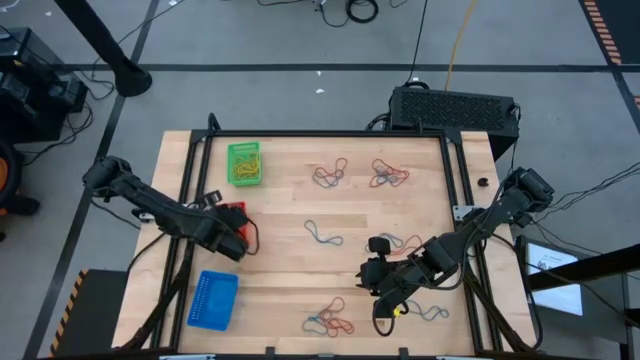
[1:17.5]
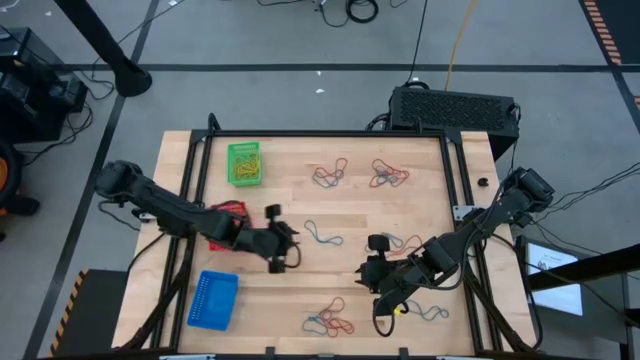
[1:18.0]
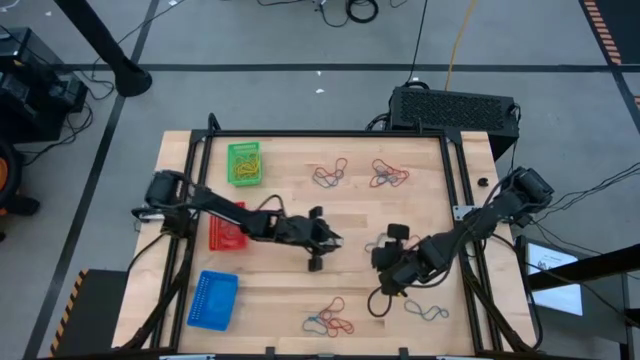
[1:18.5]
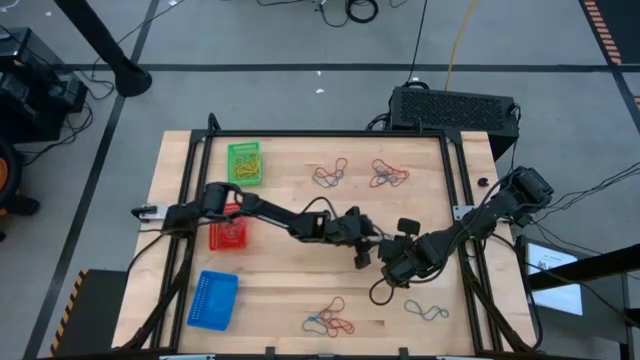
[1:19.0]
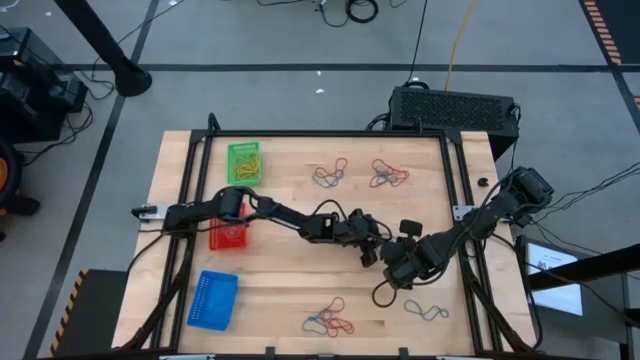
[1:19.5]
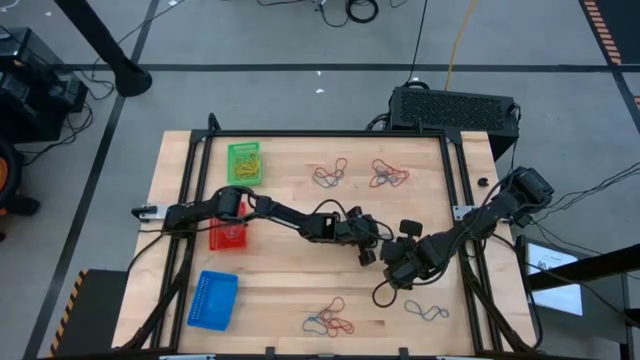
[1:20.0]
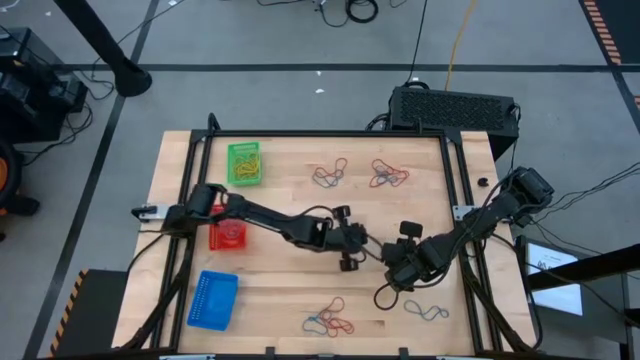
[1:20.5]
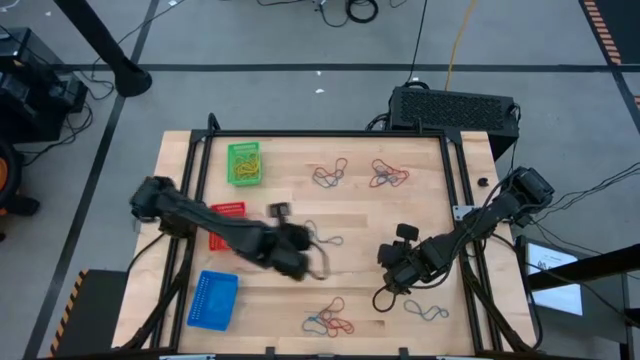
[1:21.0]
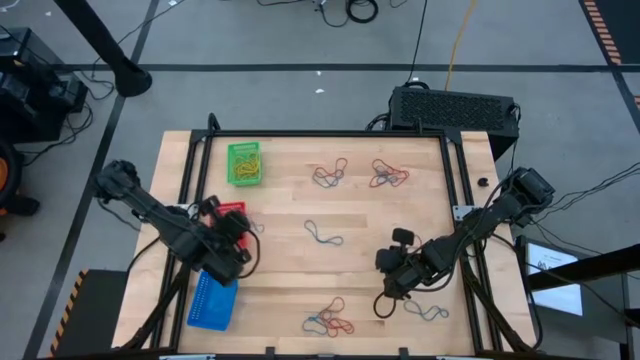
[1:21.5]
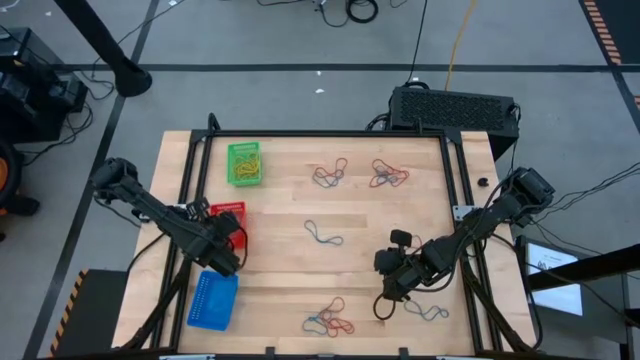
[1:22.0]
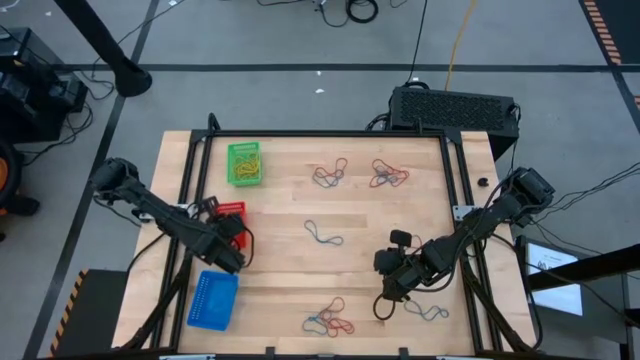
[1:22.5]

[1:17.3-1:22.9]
Task: Sort rubber bands into baskets
Put the blue rubber band into the red bin

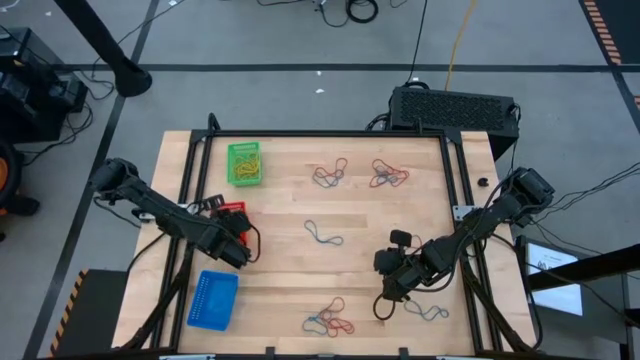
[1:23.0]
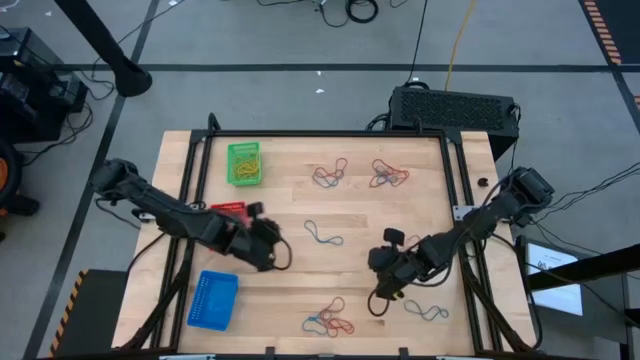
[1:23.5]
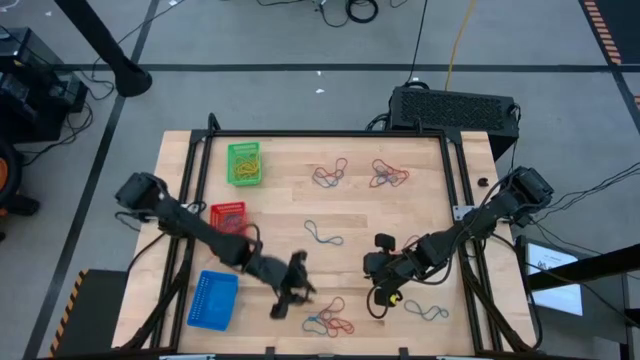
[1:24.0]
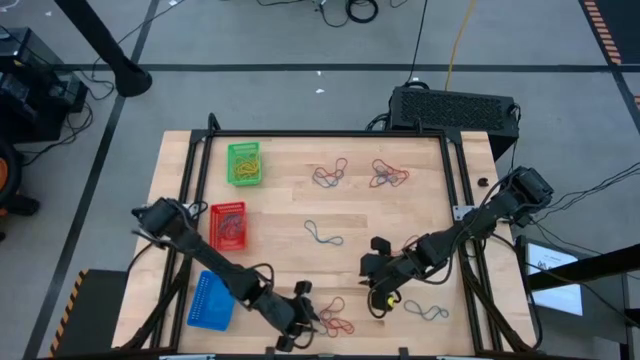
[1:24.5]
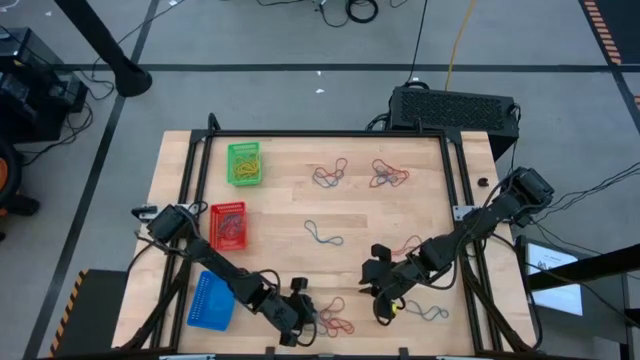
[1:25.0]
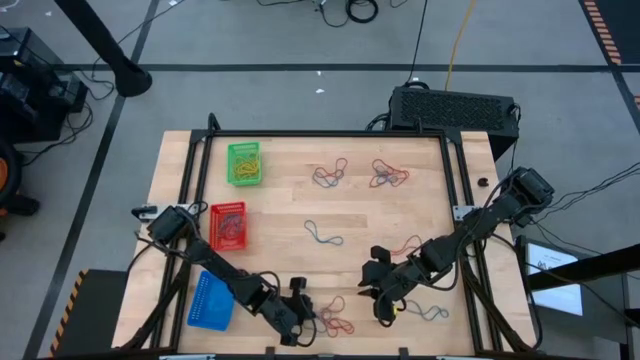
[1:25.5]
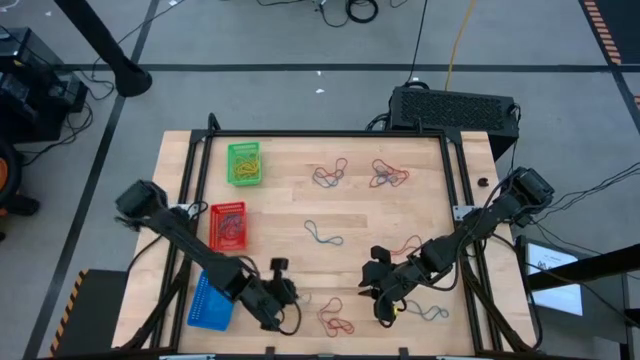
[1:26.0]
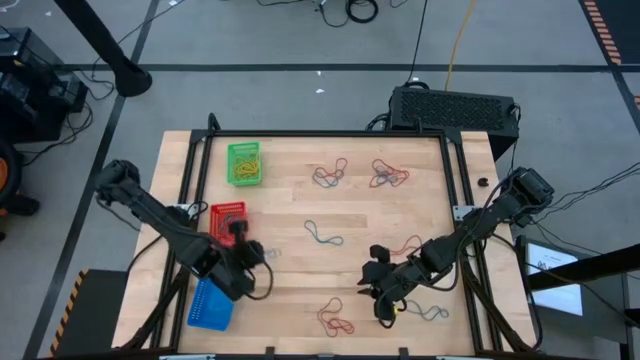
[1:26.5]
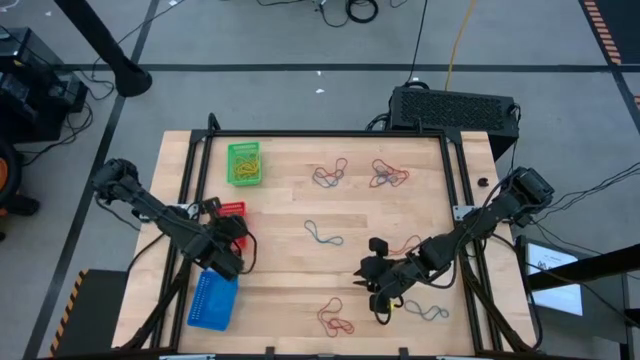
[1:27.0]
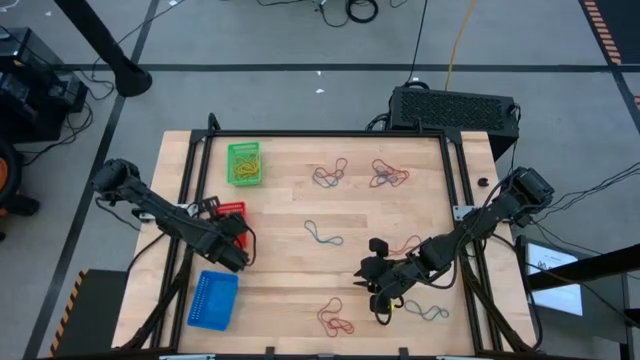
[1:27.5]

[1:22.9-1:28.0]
Put the blue rubber band into the red bin

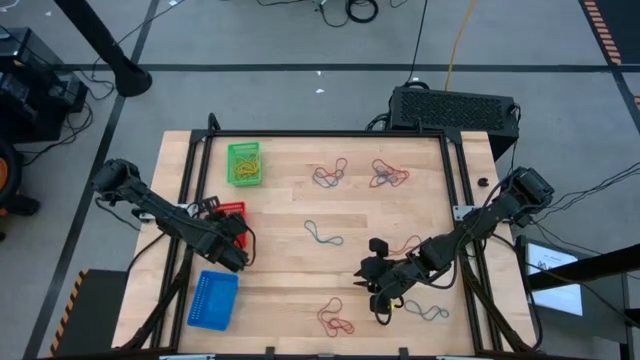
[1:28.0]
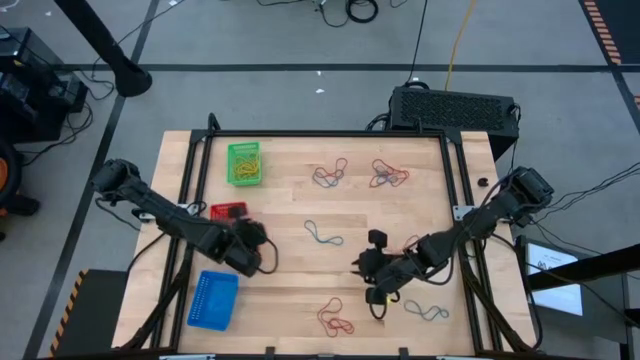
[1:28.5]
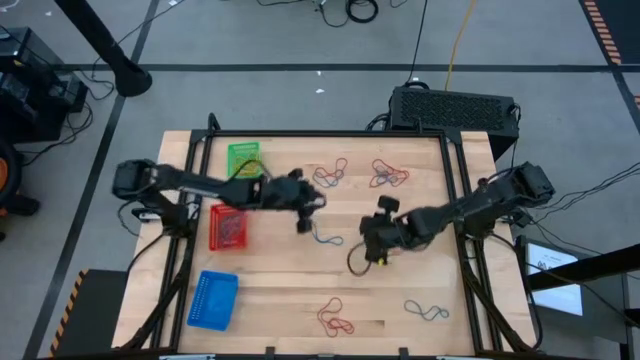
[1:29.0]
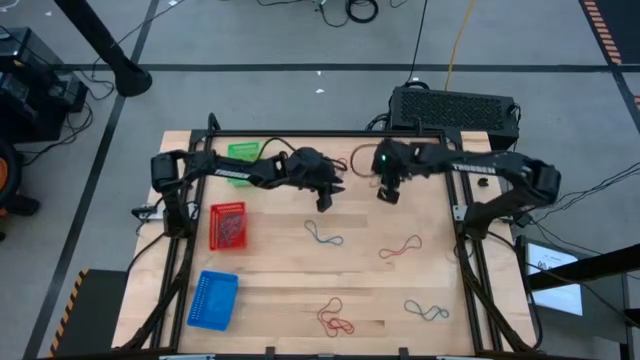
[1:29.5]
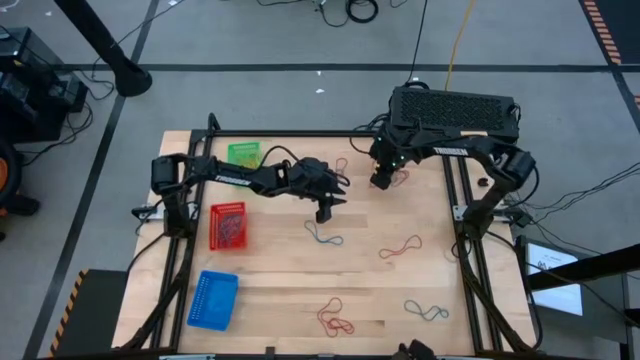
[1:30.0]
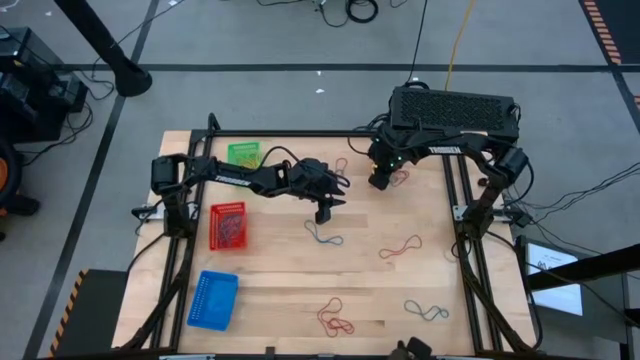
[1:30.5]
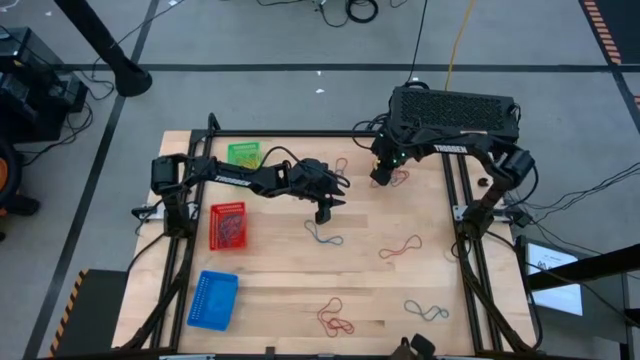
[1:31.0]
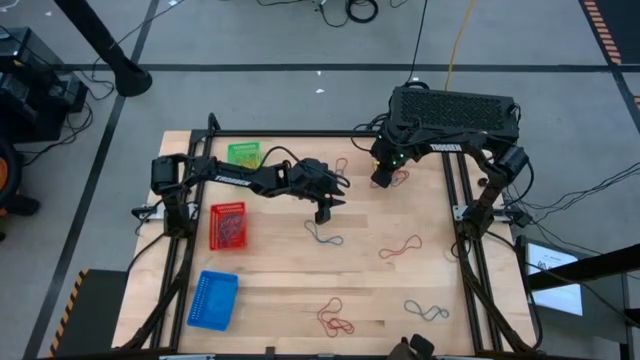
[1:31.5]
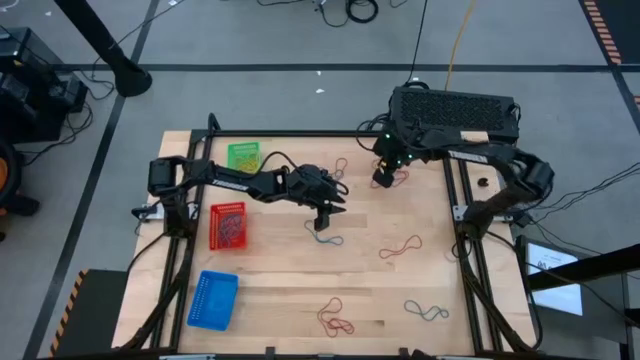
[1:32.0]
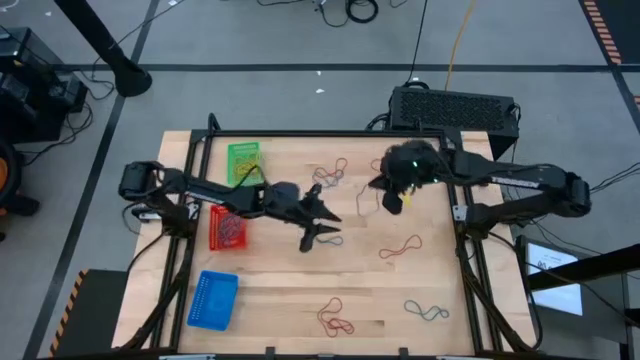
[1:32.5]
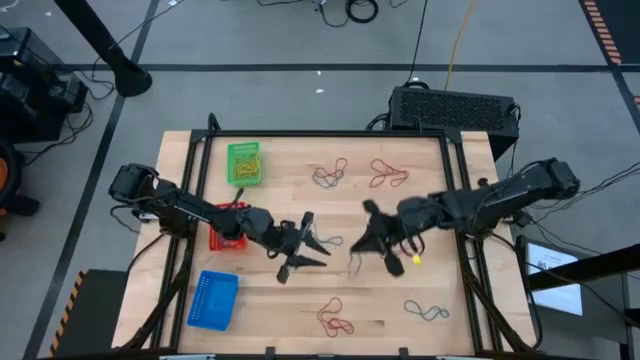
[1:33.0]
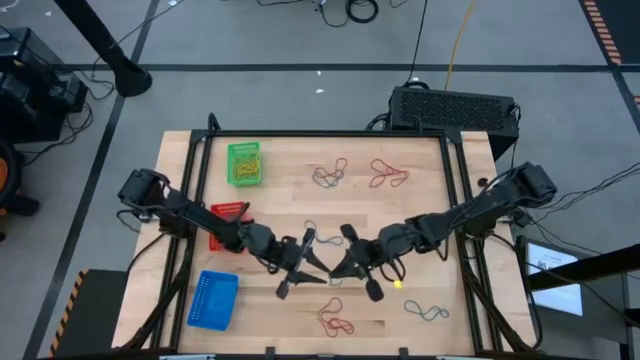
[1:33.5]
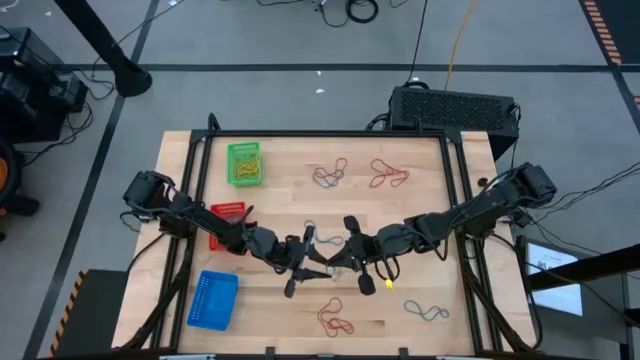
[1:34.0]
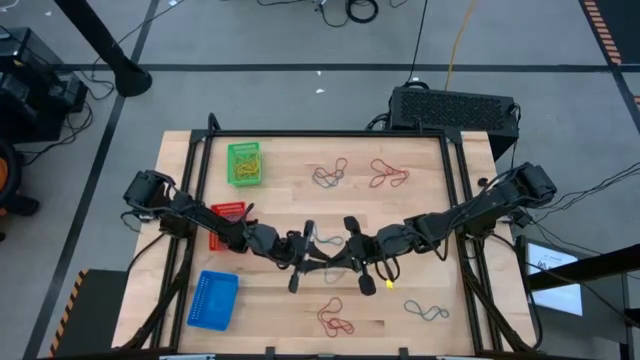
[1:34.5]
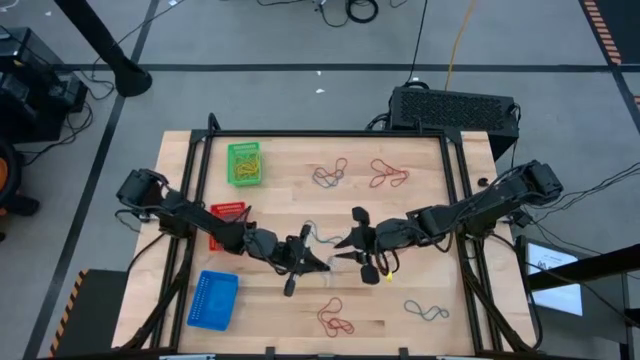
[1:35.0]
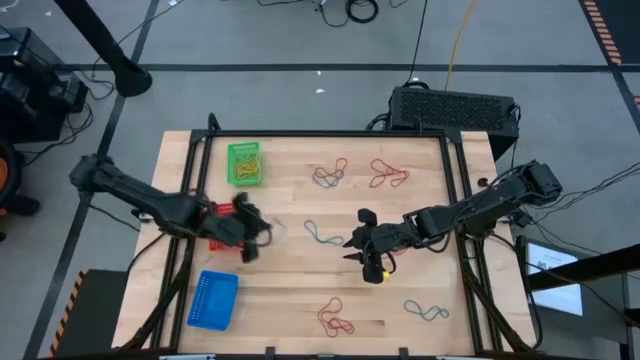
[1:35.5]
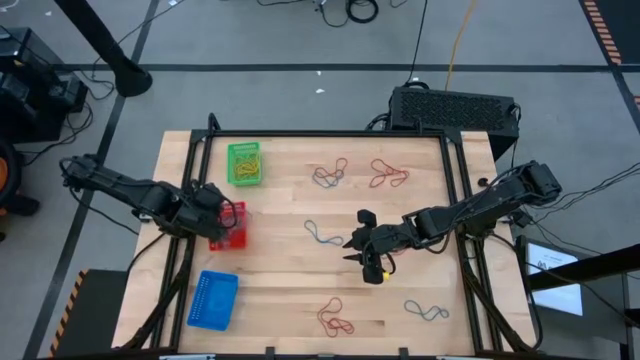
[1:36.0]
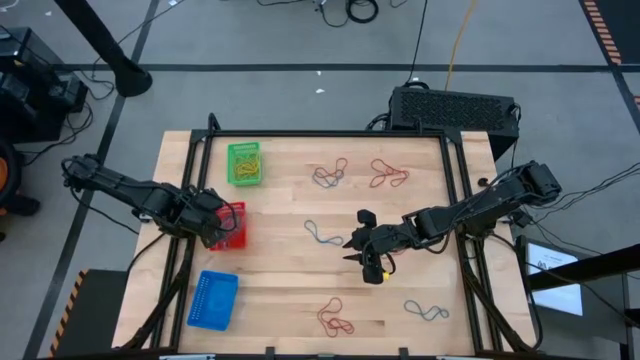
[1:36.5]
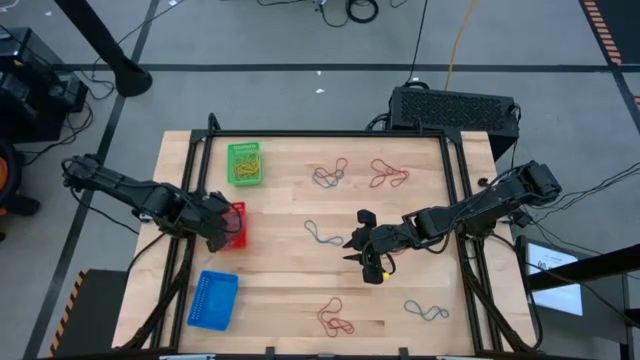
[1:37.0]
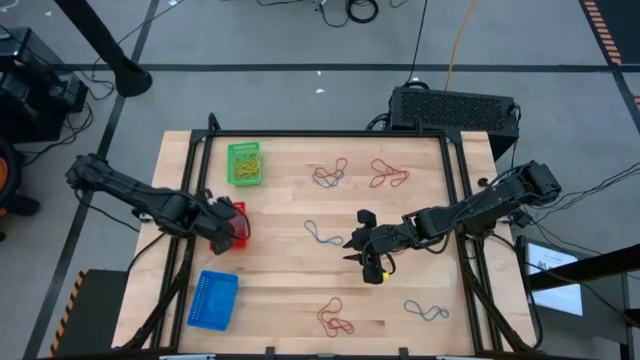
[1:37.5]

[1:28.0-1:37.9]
Put the blue rubber band into the red bin

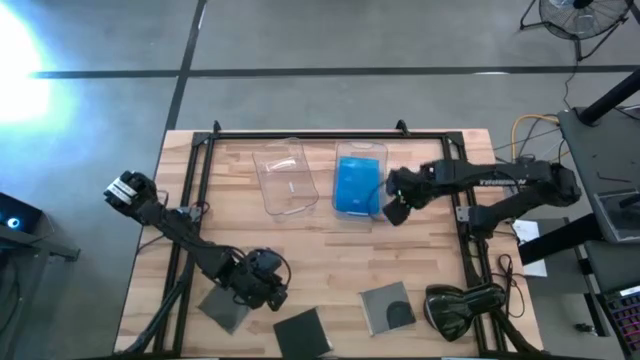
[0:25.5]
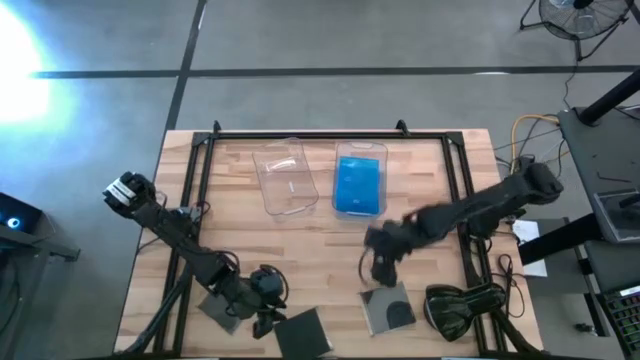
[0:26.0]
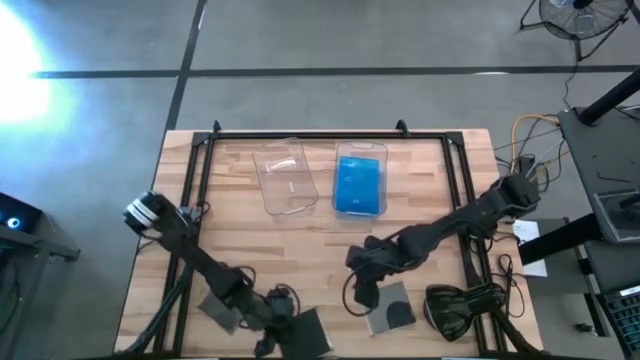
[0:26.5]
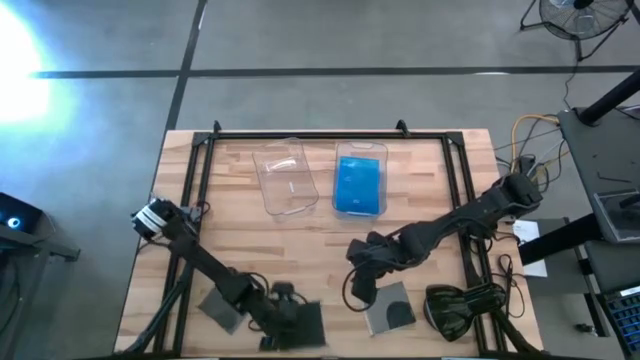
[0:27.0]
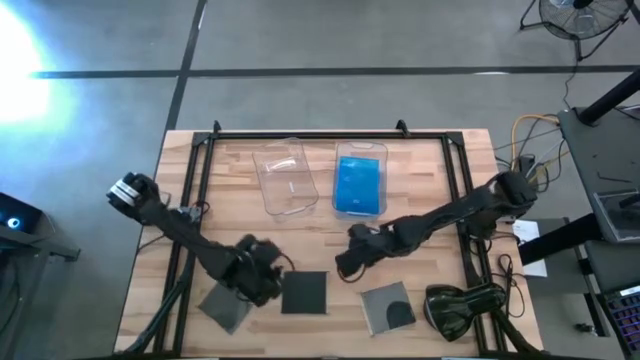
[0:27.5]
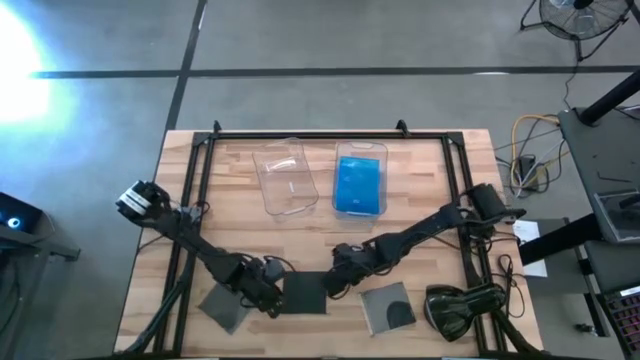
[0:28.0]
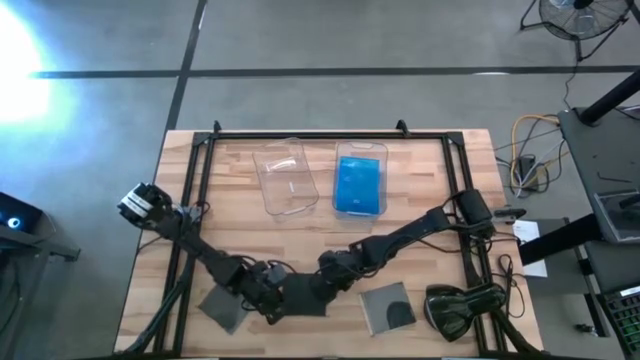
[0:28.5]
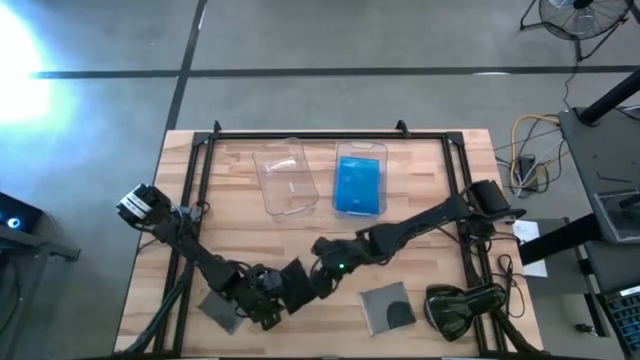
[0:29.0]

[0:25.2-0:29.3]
Task: Pick & place jewel cases by type
Put the middle black CD case into the left transparent bin
